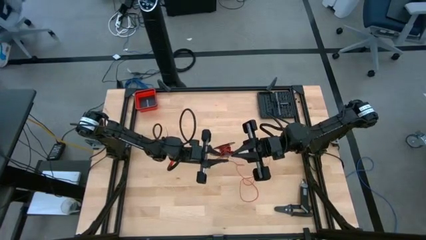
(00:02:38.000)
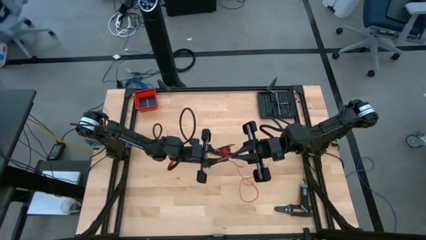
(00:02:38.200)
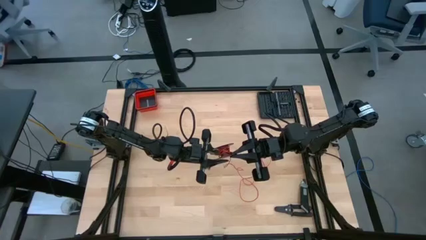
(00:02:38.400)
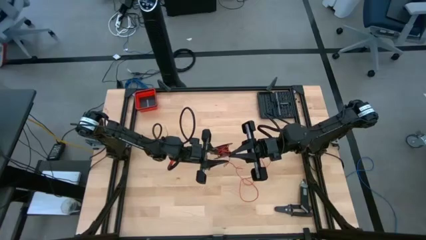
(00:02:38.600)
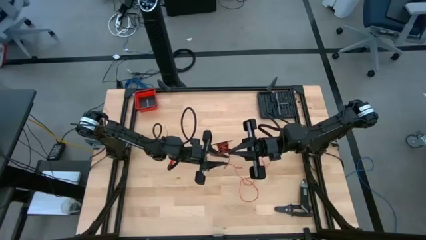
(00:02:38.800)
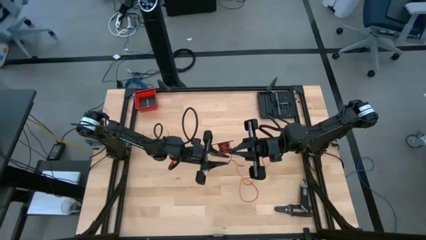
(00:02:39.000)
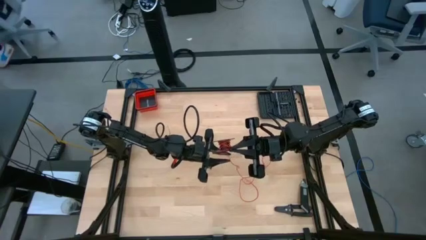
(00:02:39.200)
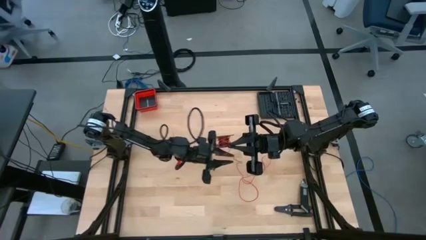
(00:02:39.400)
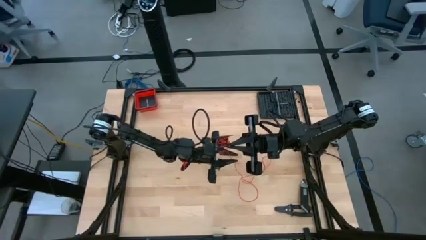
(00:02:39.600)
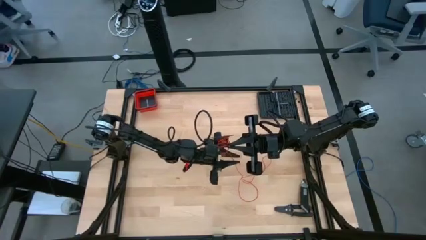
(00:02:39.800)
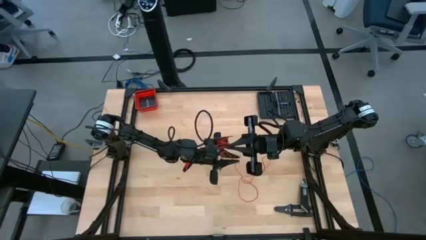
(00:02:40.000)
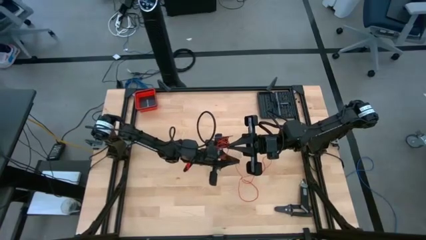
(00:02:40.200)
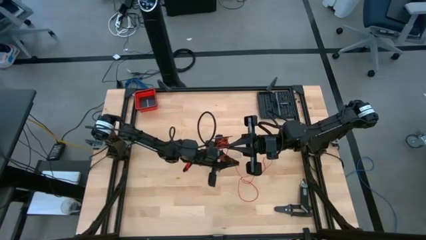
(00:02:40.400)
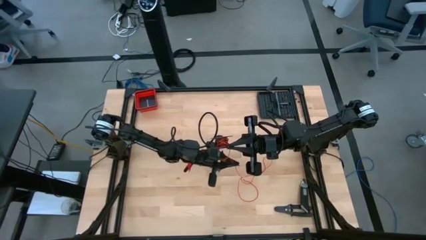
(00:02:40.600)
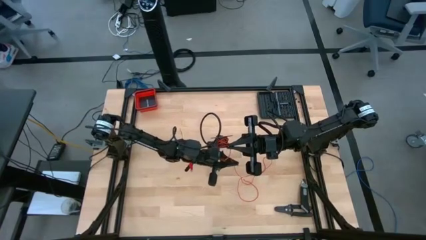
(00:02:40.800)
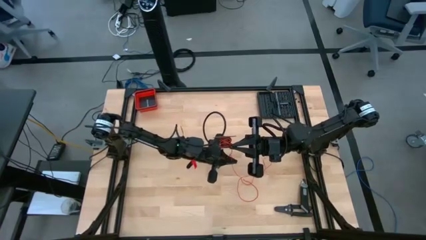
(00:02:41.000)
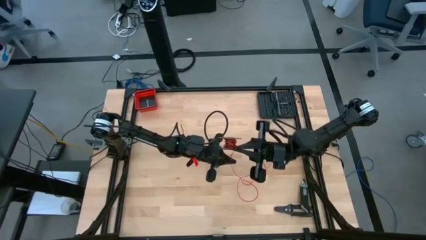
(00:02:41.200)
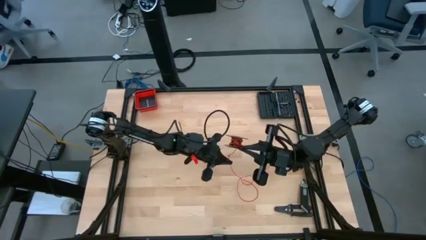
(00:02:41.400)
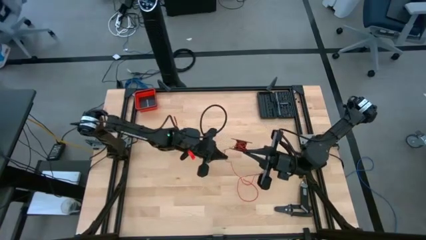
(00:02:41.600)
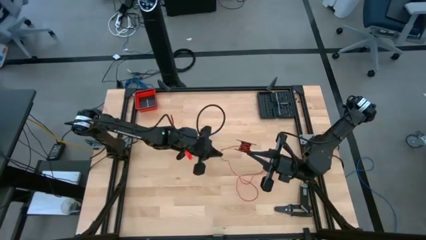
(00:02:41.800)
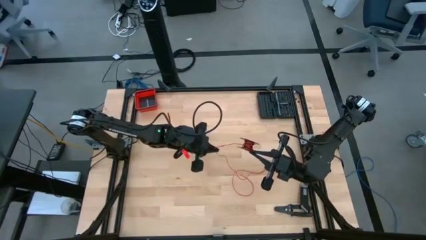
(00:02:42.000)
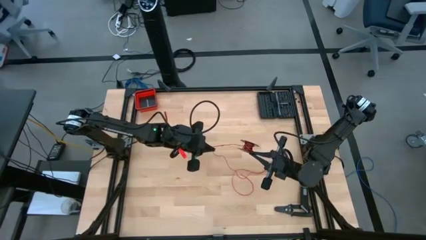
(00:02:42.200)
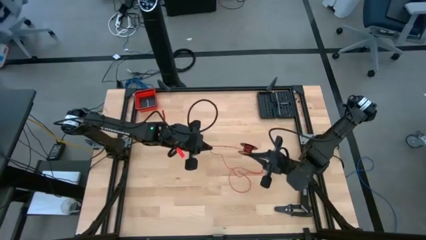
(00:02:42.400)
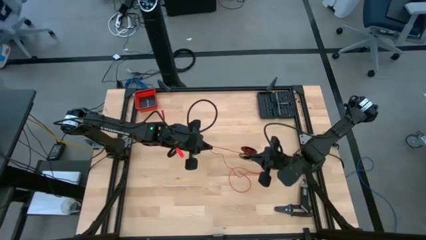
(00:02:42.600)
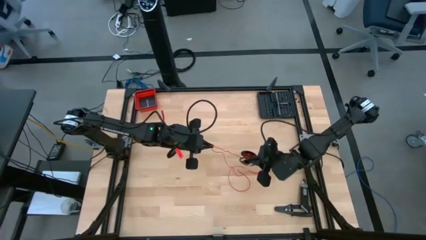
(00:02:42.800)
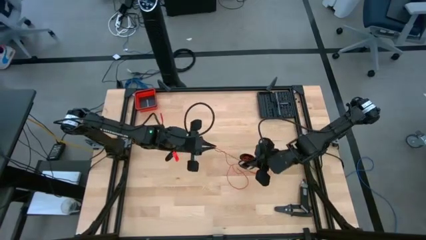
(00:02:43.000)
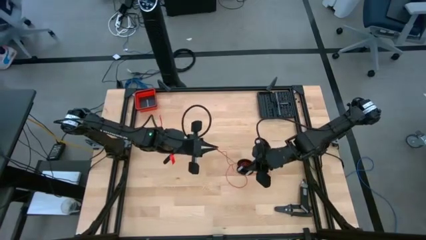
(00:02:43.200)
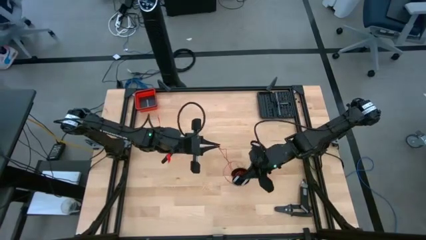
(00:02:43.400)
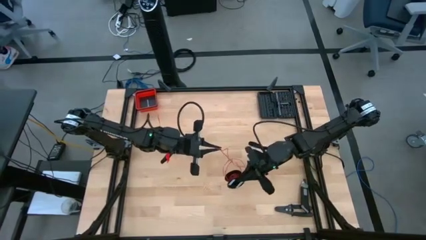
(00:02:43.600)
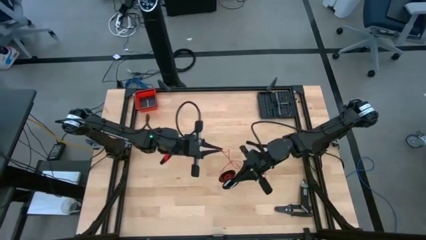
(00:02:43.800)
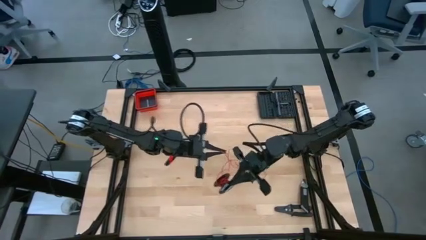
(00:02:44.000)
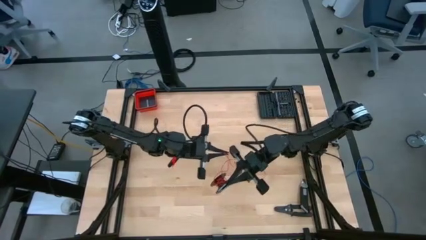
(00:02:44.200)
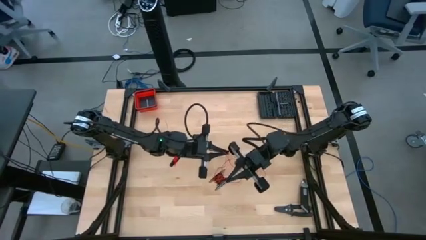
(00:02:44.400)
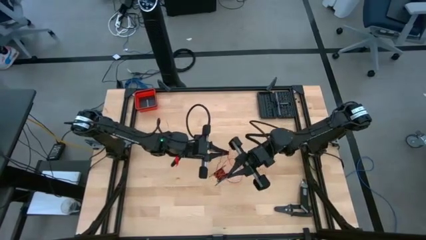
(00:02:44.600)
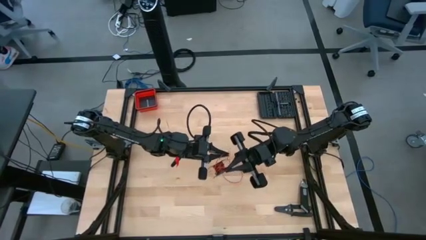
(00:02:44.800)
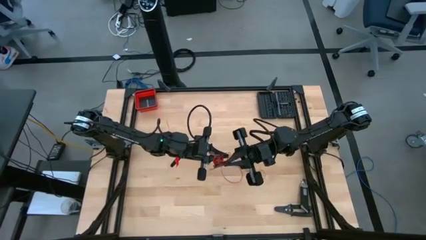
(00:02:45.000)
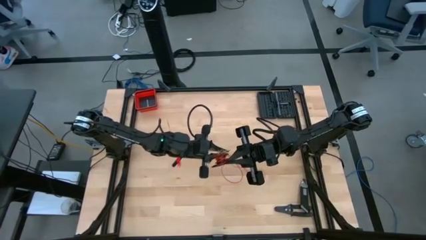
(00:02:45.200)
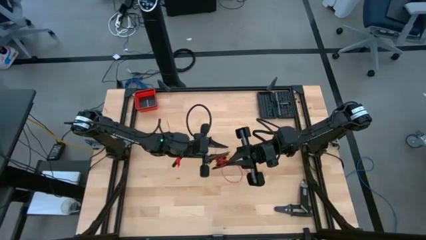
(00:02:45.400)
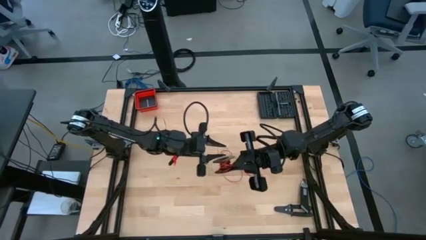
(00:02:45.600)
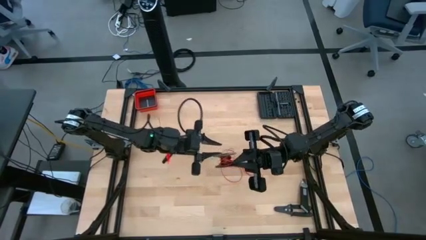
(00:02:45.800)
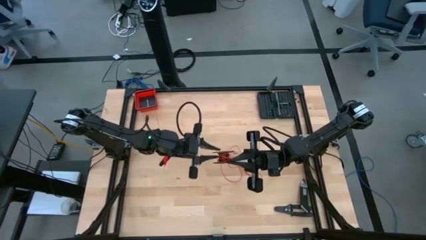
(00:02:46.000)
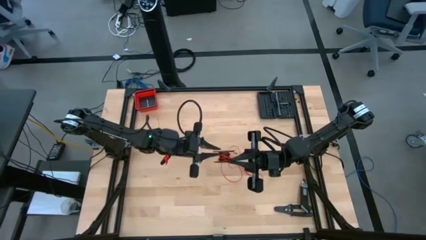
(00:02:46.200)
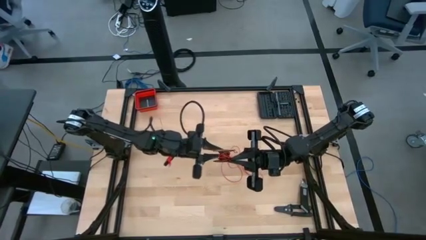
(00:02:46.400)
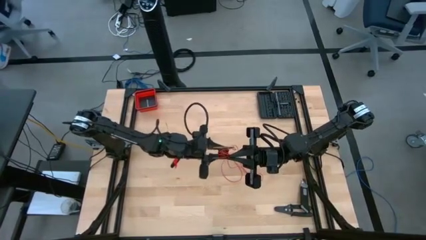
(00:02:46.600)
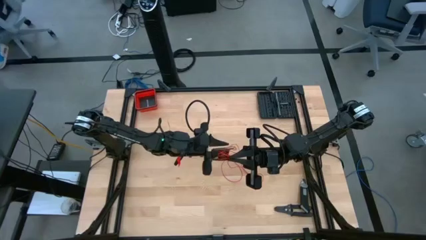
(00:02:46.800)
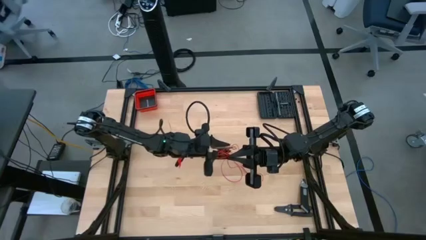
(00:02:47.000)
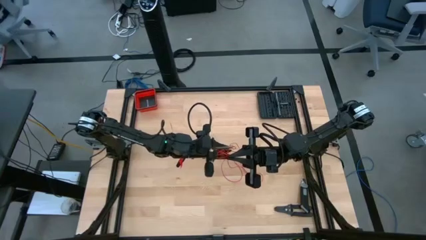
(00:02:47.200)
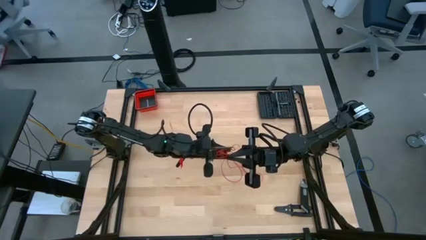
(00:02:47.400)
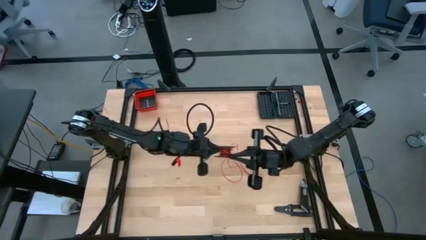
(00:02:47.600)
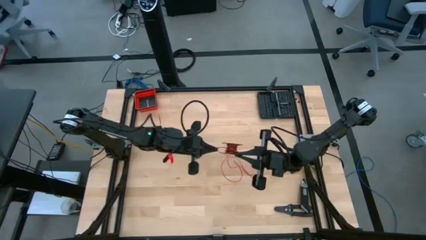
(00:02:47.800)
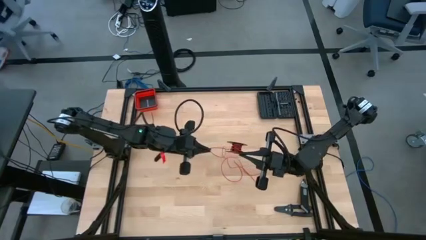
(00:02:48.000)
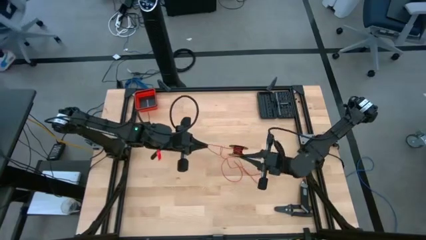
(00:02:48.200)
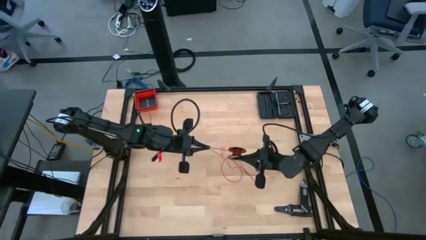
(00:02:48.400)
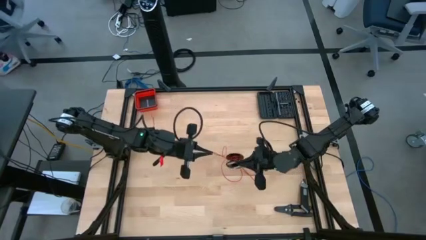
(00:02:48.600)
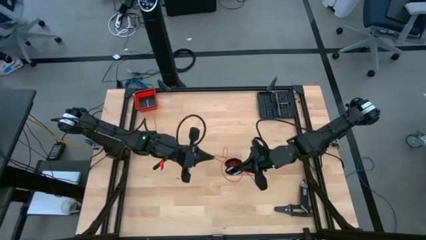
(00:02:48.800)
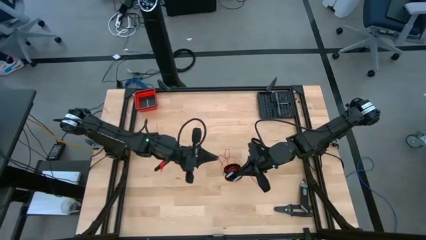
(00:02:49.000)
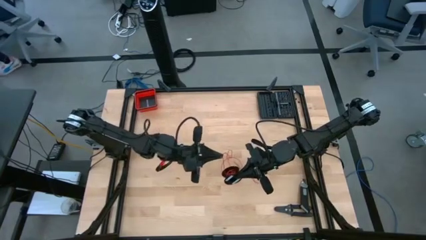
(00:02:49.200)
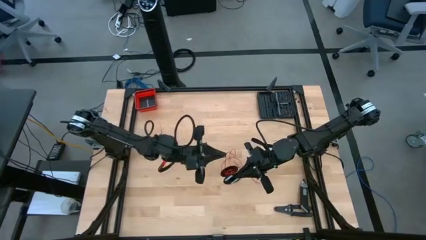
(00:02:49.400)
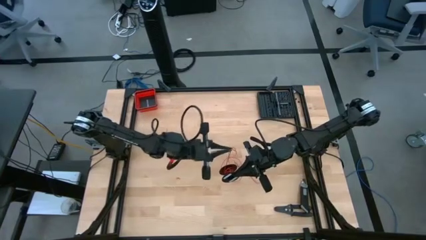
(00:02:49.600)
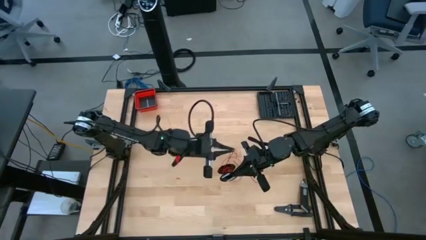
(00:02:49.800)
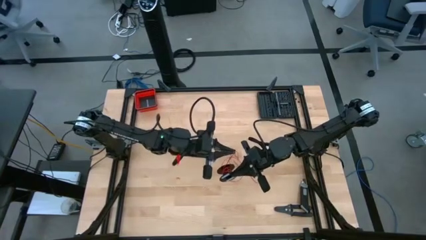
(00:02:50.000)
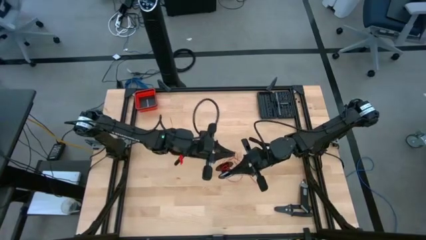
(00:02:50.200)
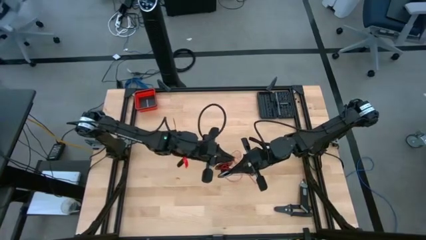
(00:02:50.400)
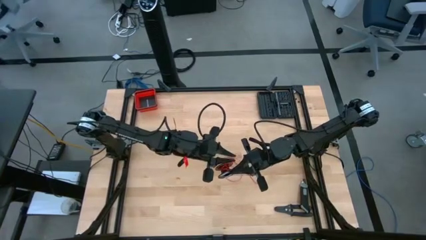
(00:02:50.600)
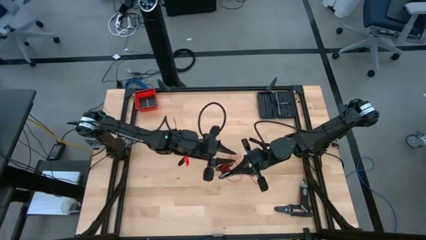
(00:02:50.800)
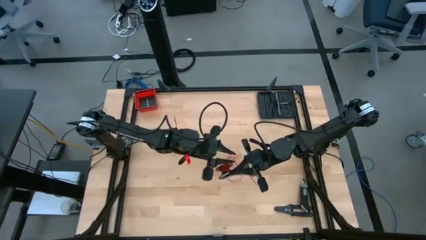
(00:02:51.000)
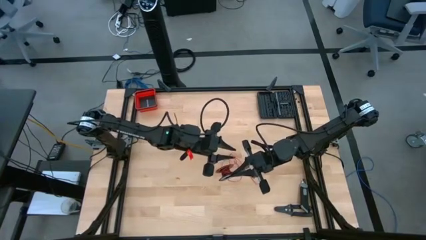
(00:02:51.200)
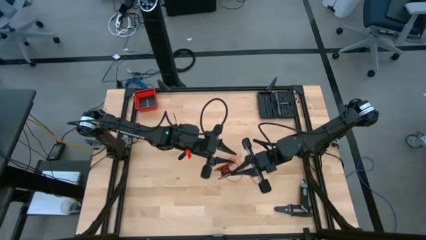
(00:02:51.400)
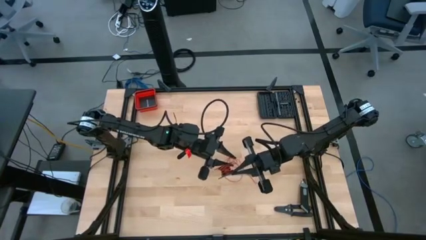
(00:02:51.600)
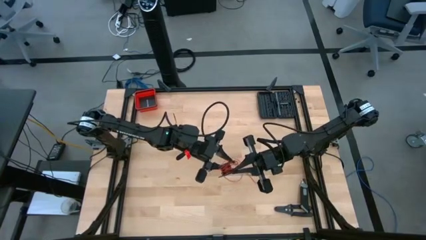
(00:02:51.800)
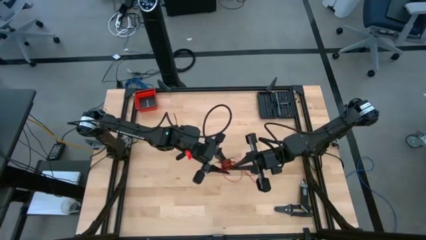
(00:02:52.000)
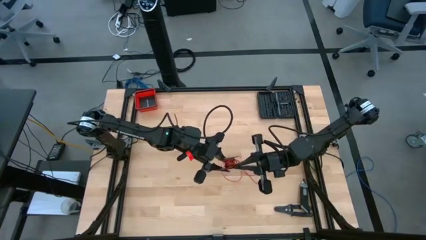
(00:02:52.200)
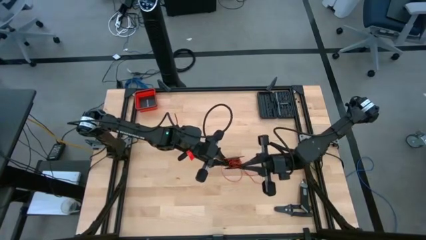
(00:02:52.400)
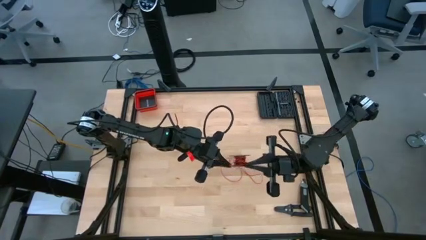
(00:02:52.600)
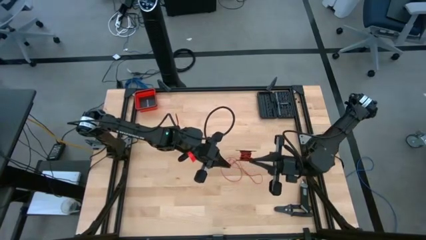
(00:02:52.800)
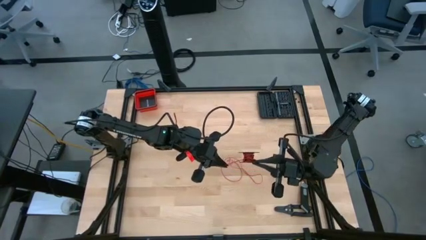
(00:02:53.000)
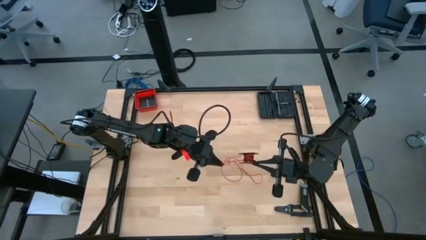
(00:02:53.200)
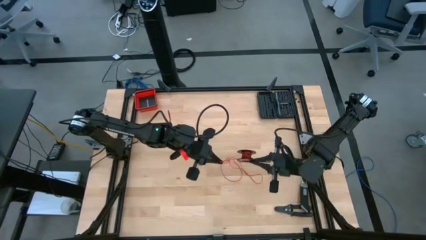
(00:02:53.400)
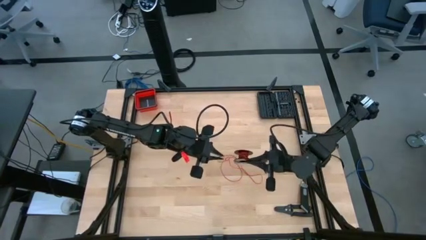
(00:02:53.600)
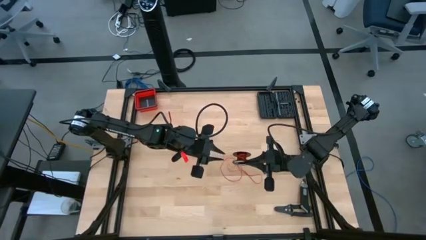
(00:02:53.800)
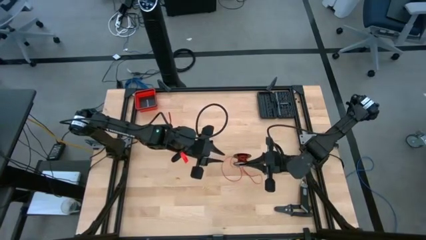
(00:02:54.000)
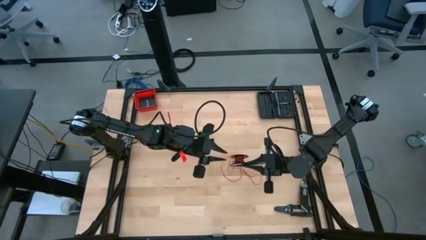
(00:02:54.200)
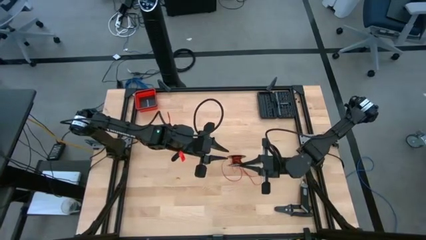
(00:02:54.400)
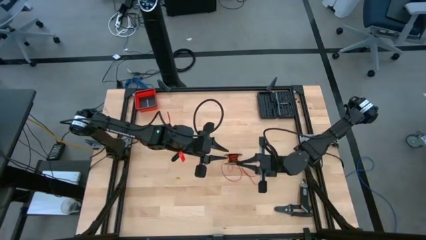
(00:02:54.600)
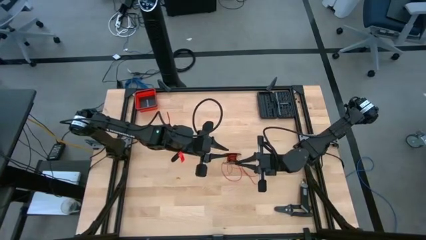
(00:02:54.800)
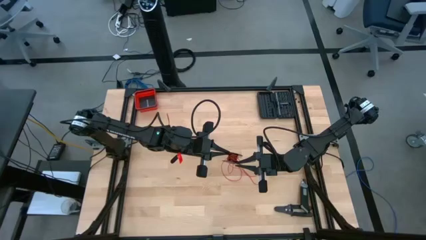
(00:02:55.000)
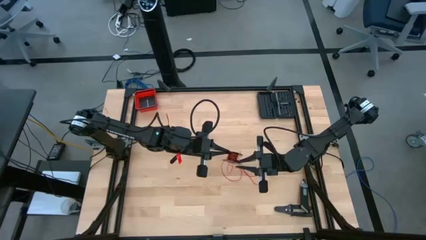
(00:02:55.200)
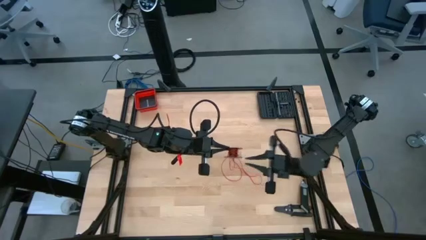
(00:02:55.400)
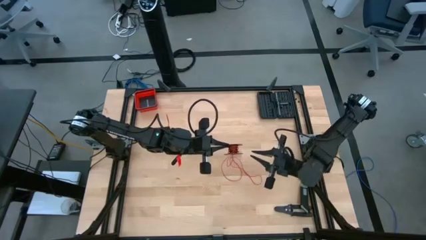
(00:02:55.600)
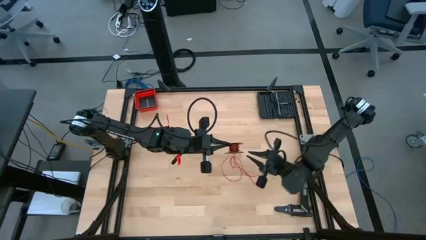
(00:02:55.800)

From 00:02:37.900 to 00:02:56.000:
Task: Coil cords
Coil the red wire onto the spool
